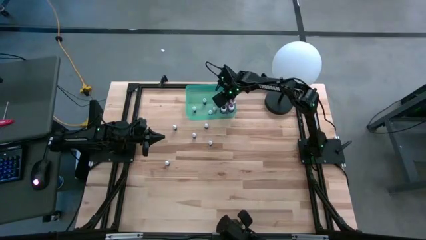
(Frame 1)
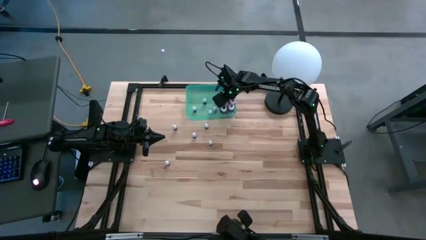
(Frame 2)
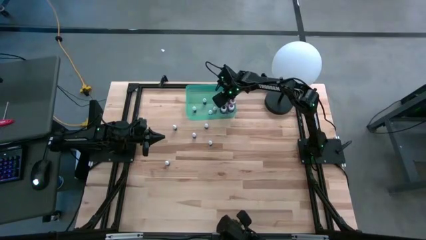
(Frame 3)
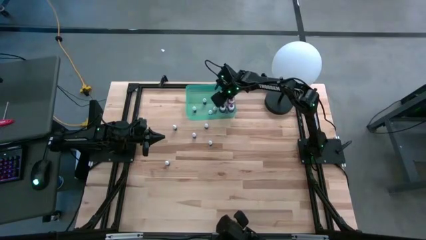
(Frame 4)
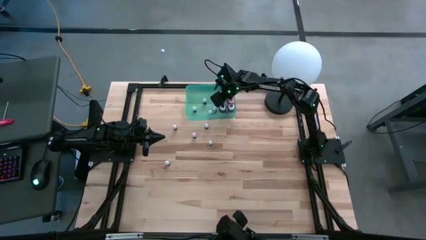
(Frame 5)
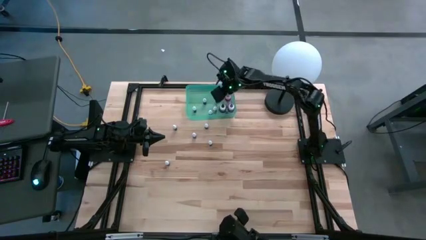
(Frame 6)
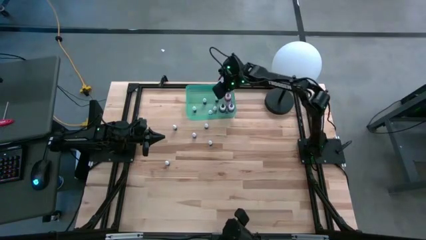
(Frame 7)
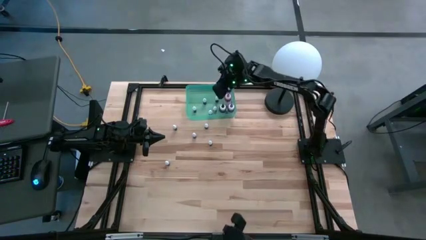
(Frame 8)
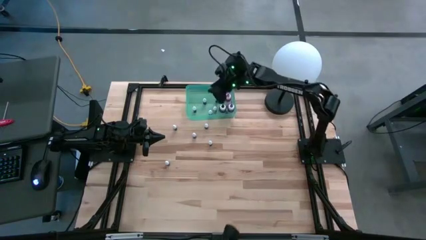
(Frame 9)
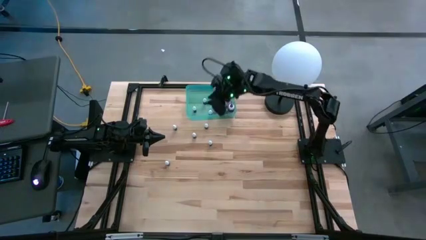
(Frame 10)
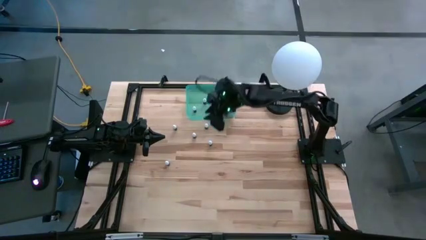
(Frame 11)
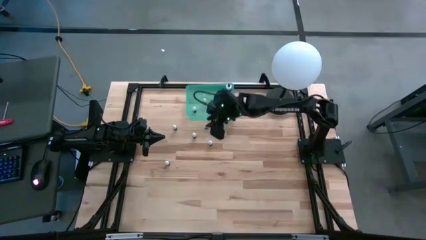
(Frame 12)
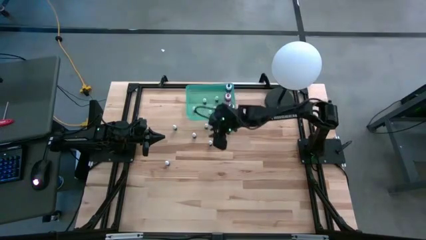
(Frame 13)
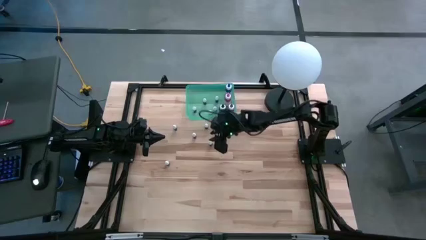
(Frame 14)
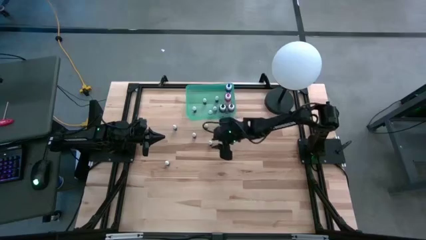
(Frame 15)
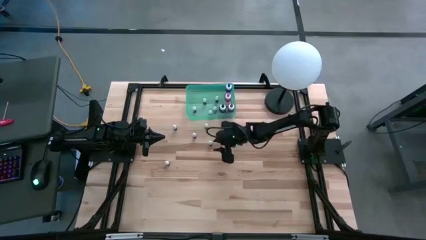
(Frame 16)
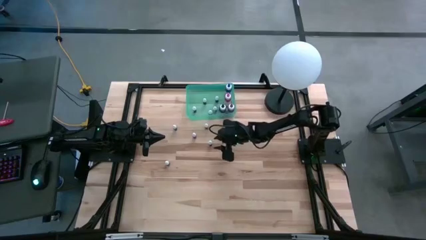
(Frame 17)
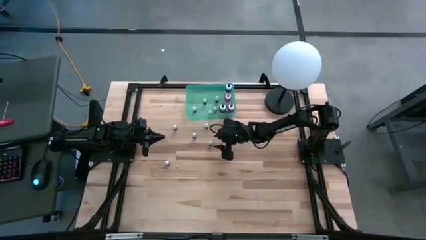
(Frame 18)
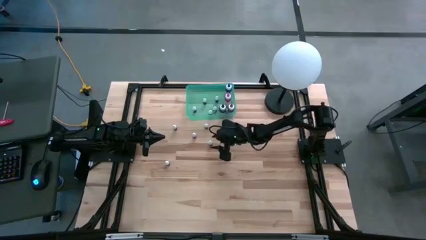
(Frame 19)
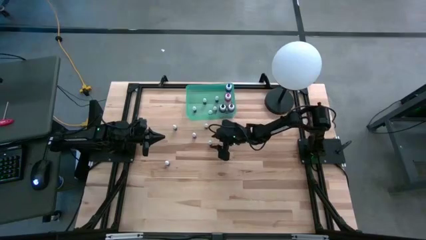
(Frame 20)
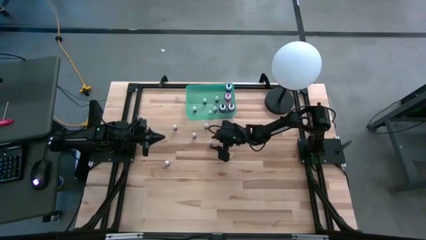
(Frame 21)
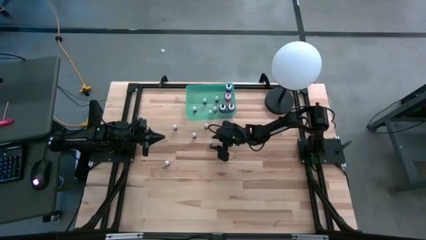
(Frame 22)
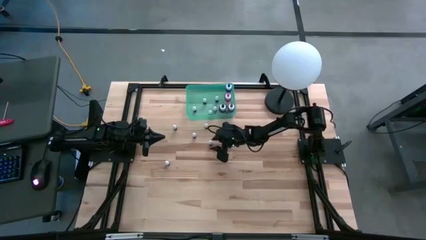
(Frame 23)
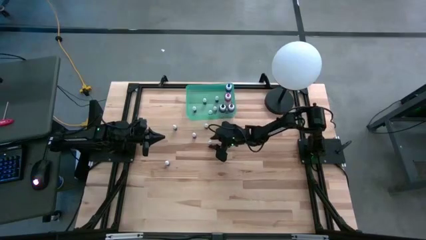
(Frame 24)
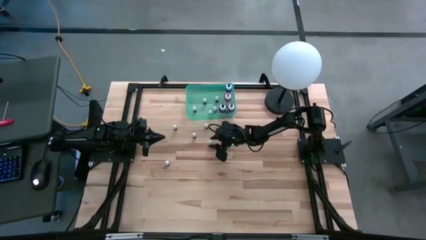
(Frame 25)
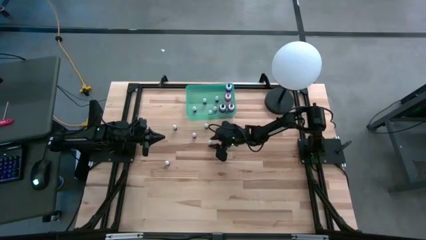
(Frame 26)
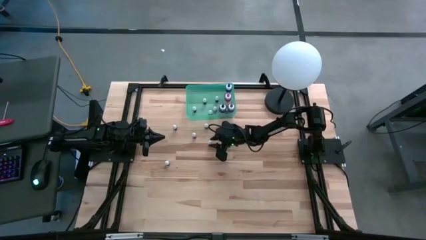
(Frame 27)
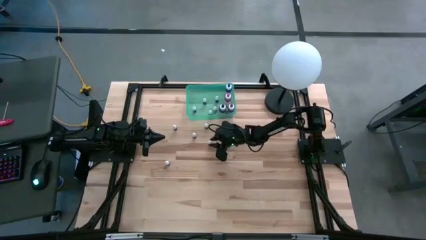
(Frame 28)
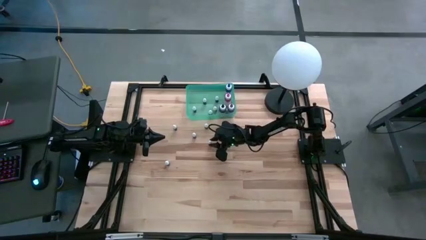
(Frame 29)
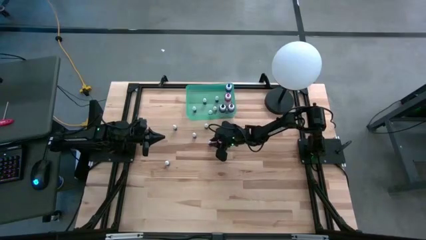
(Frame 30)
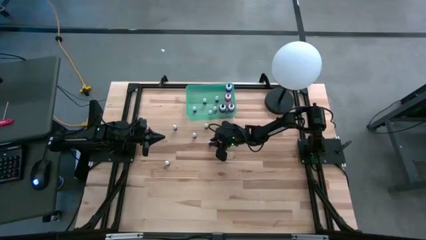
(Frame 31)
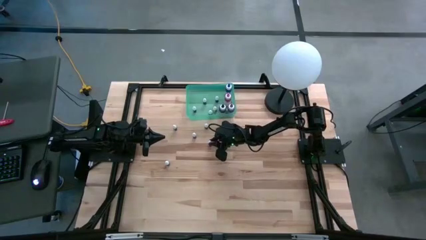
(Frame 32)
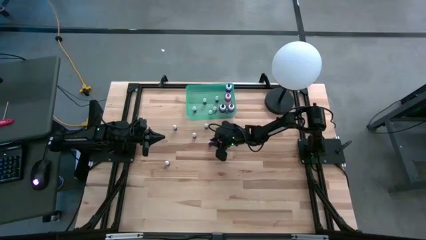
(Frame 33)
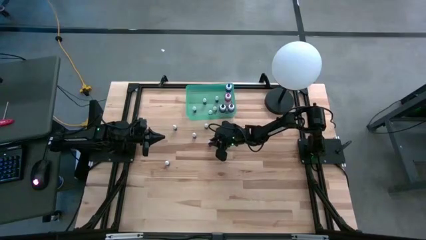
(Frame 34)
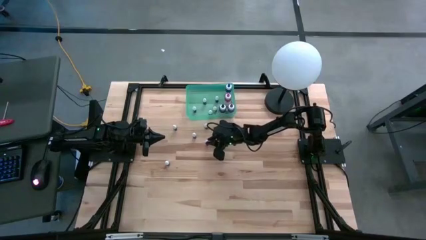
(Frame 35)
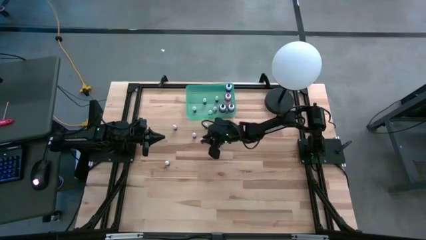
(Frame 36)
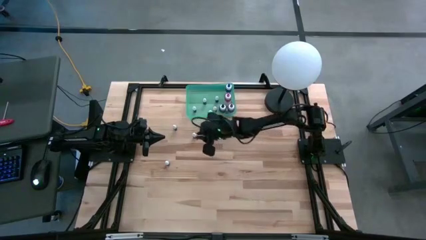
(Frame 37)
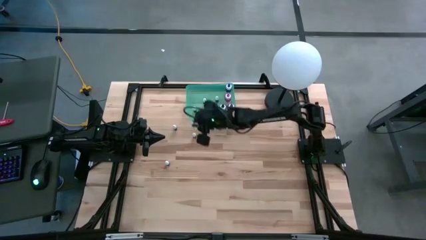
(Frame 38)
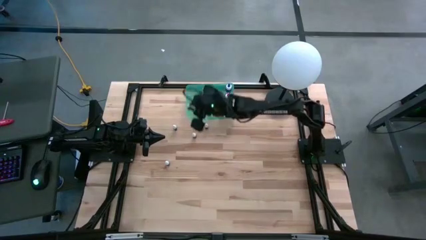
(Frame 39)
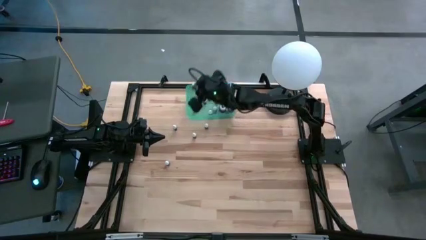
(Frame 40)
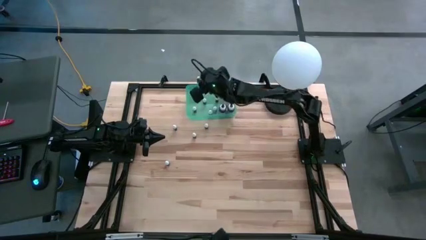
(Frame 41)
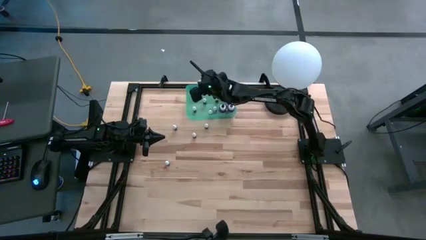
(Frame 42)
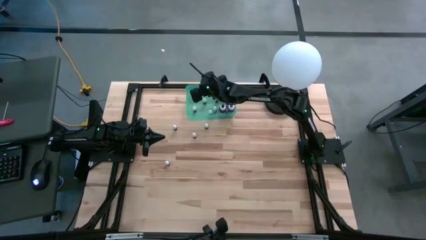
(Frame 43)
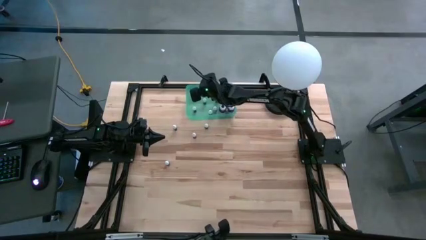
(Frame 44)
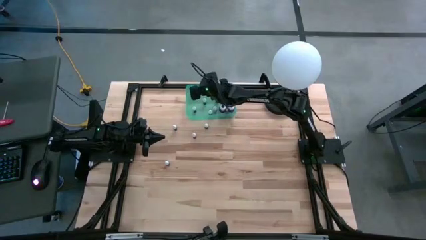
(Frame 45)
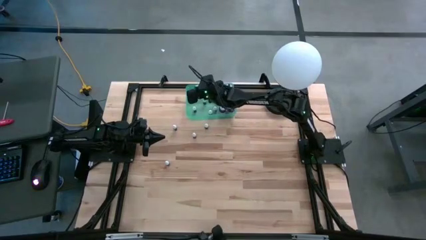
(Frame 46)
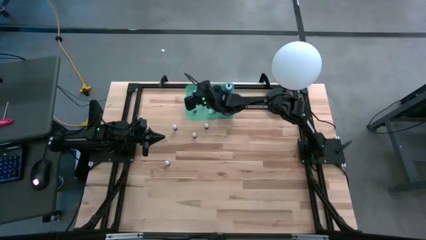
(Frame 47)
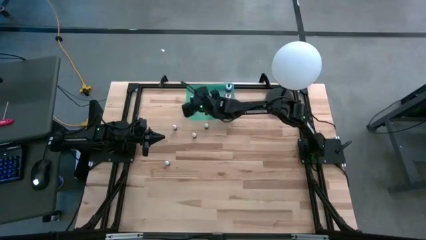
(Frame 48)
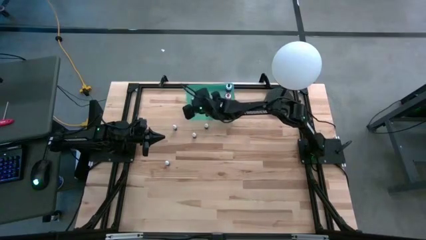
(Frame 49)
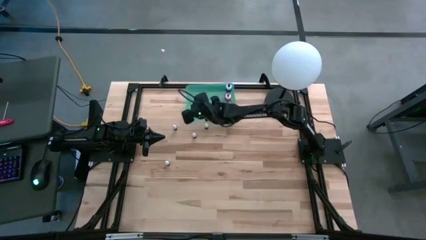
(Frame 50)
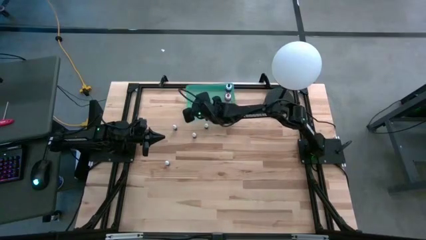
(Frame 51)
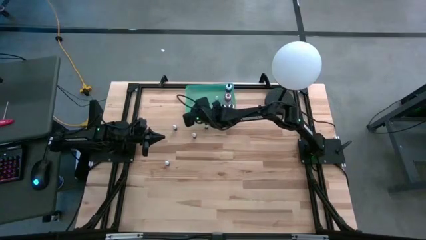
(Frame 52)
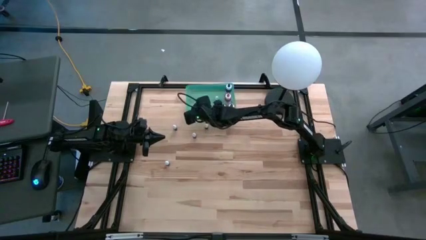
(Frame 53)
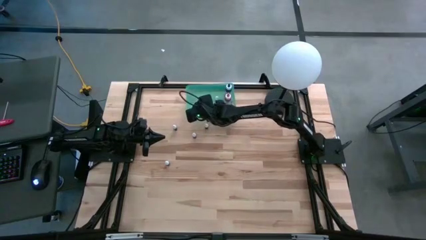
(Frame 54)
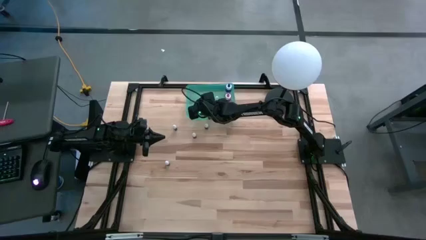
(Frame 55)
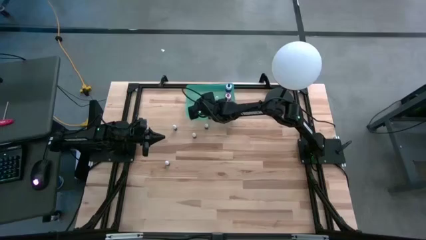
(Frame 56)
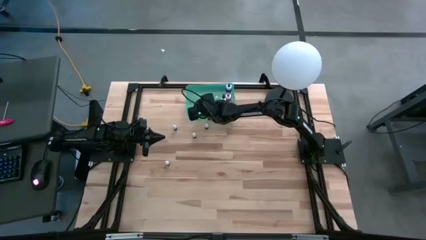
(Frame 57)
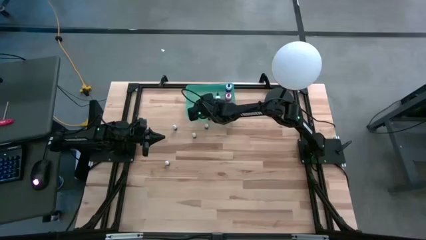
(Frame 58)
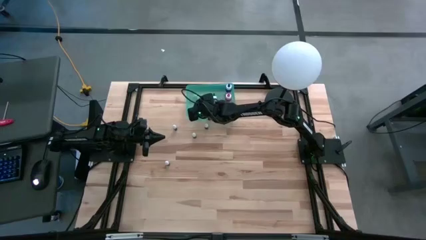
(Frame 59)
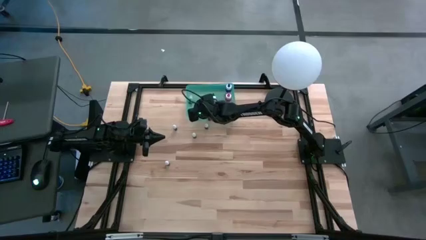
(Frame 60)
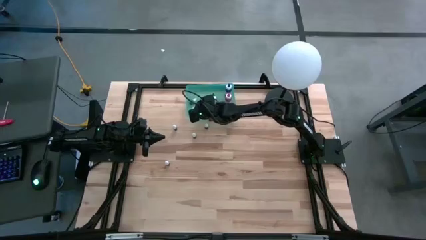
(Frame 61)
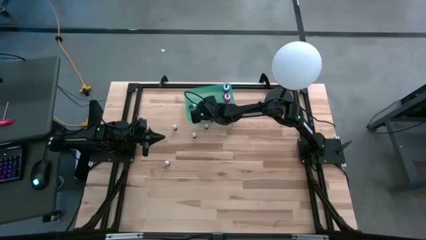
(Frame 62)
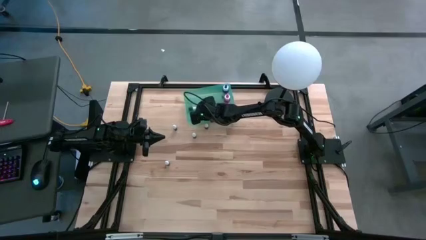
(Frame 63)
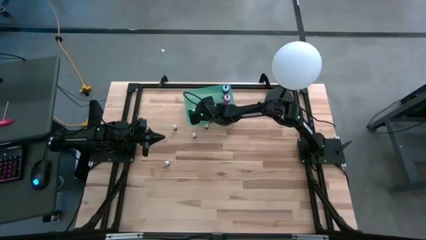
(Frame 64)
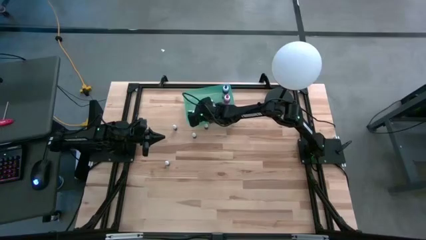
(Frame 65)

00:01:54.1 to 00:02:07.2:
Task: Pick & Place food coloring
Put the small red food coloring into the bin

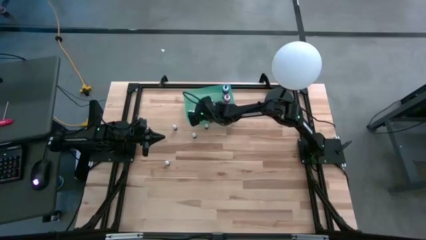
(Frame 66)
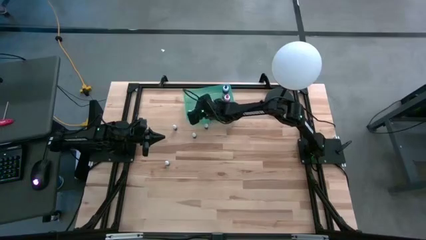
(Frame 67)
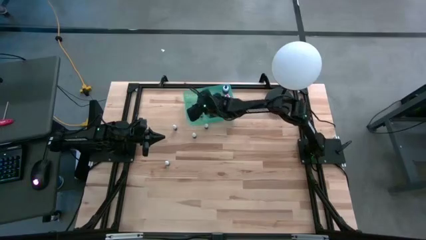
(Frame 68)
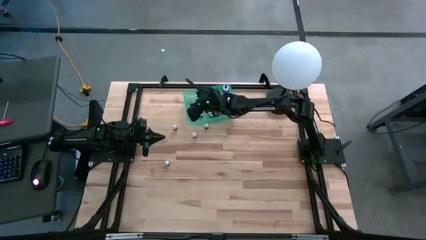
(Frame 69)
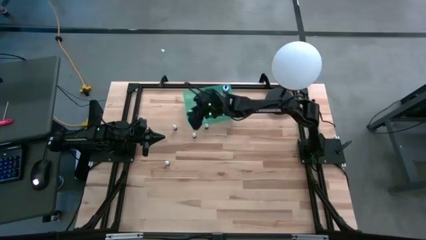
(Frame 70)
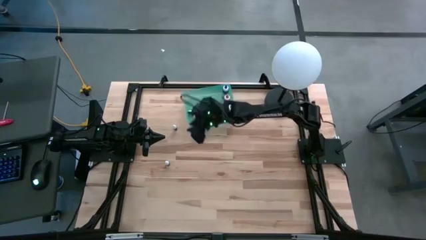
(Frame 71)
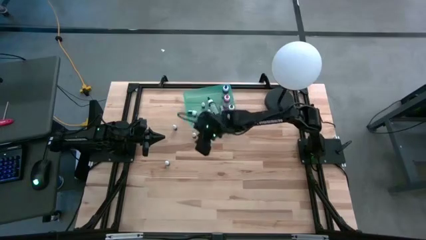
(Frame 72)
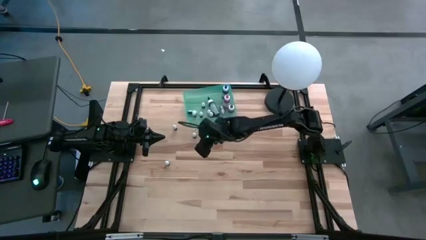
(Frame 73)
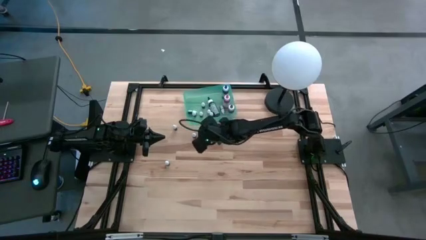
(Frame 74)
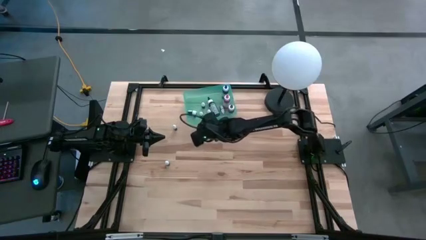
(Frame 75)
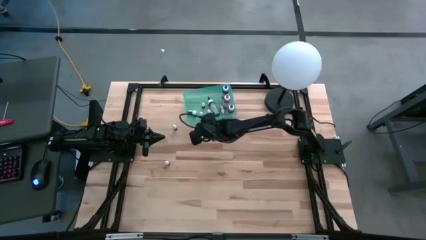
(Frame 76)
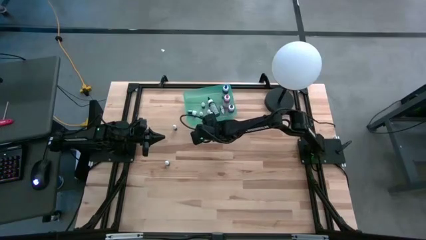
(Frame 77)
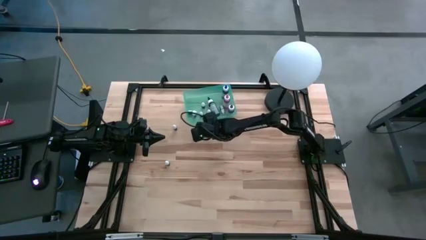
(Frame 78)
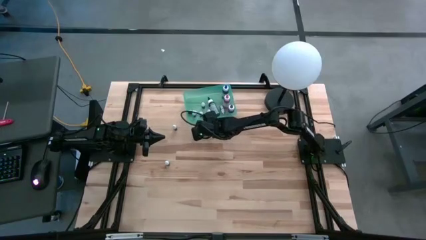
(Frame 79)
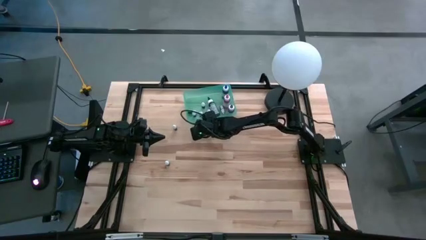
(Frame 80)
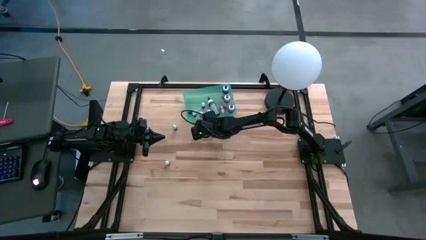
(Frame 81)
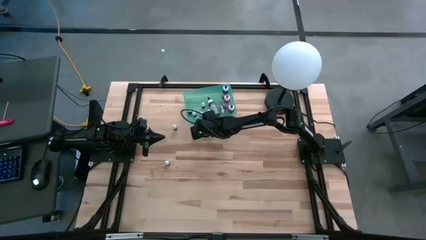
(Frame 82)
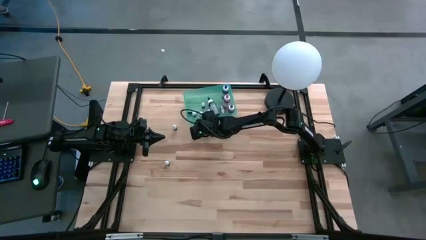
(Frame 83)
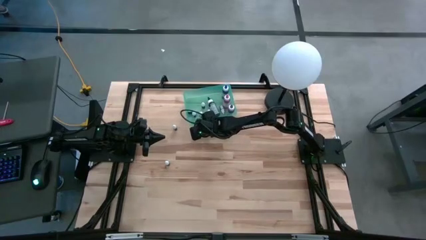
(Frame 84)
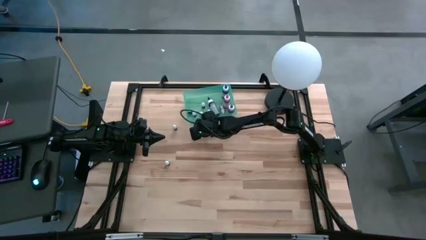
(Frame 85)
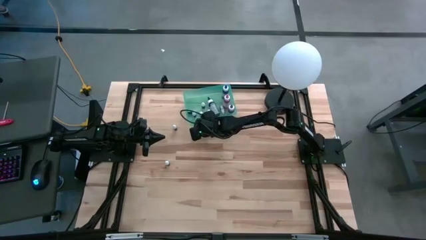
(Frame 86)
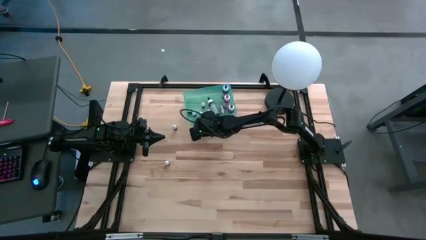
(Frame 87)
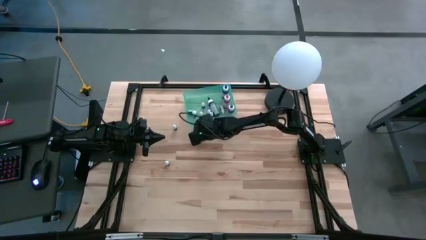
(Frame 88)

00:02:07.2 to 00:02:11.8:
Put the small purple food coloring into the bin
